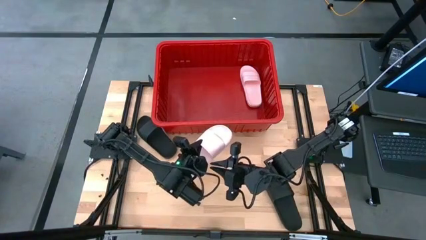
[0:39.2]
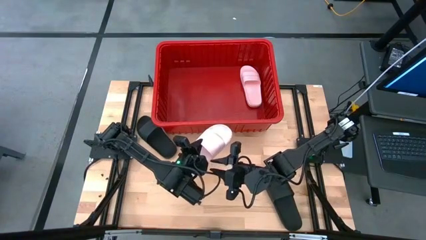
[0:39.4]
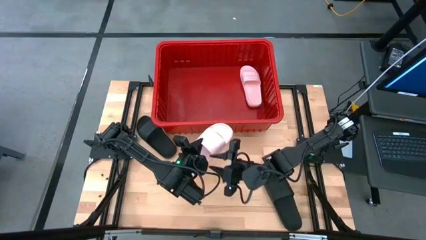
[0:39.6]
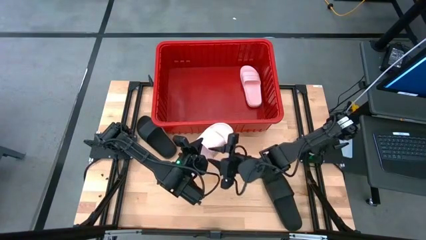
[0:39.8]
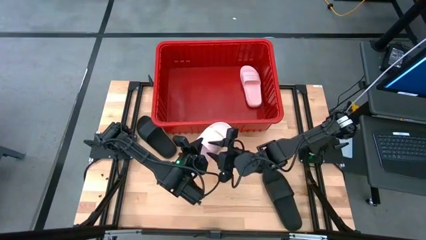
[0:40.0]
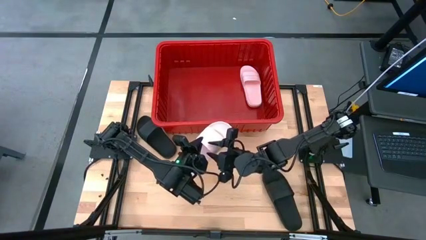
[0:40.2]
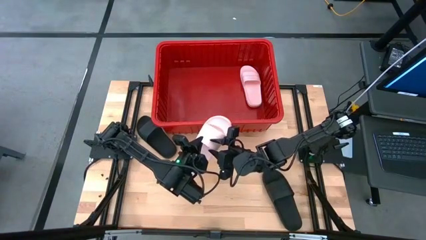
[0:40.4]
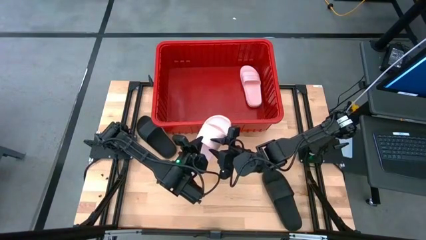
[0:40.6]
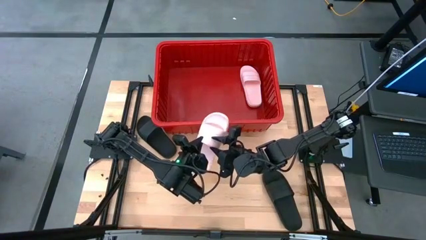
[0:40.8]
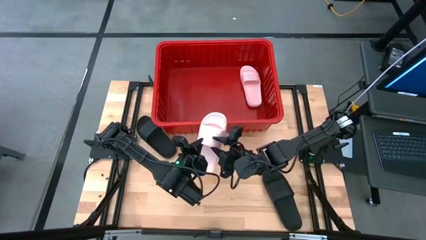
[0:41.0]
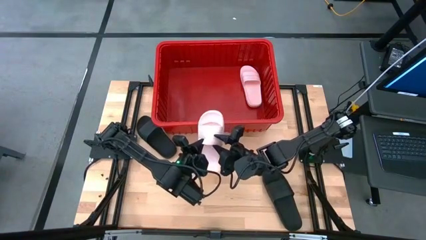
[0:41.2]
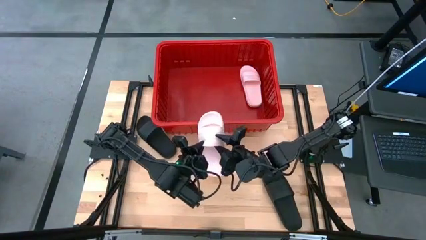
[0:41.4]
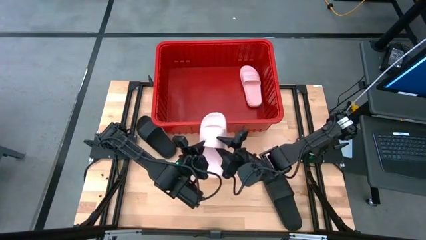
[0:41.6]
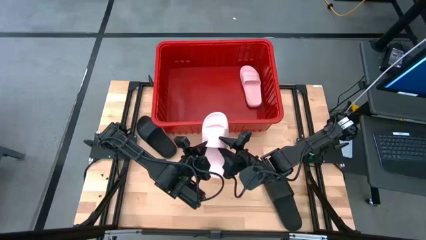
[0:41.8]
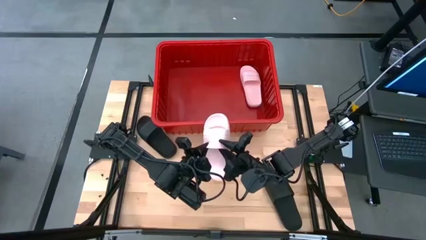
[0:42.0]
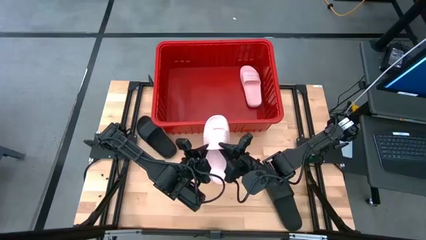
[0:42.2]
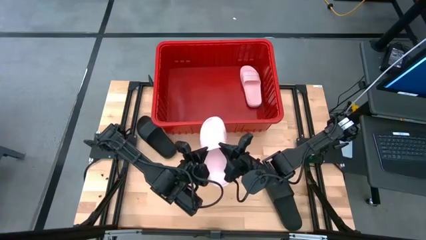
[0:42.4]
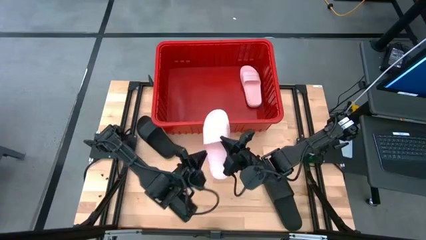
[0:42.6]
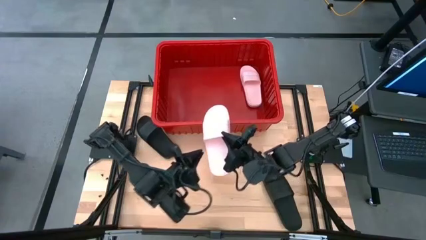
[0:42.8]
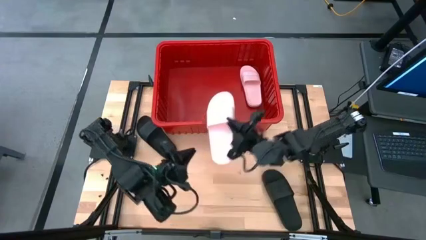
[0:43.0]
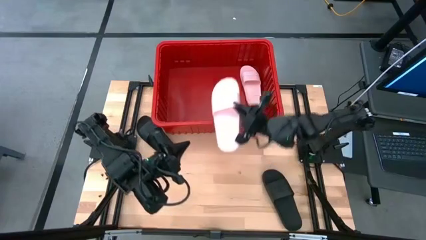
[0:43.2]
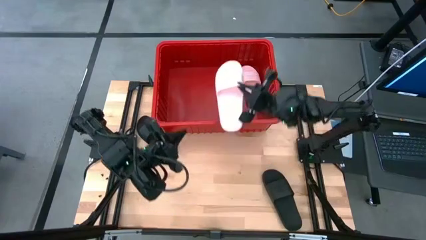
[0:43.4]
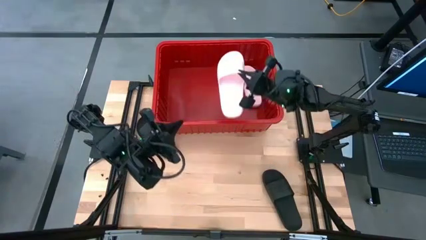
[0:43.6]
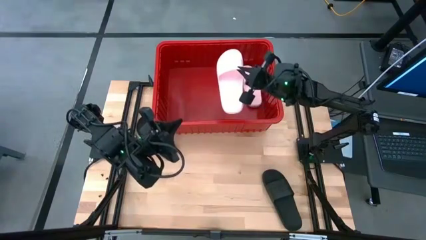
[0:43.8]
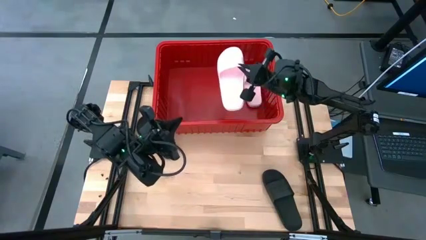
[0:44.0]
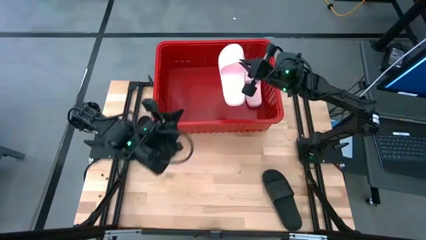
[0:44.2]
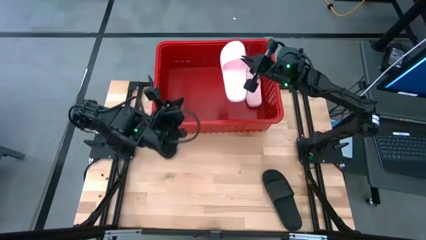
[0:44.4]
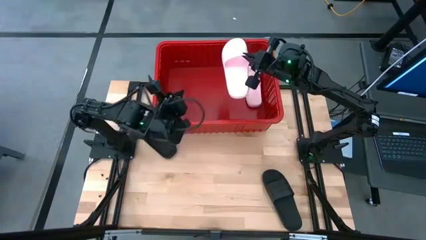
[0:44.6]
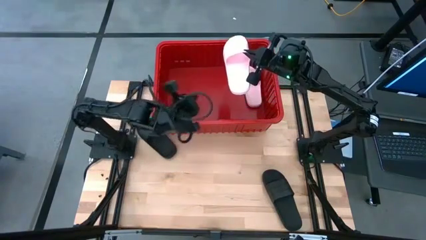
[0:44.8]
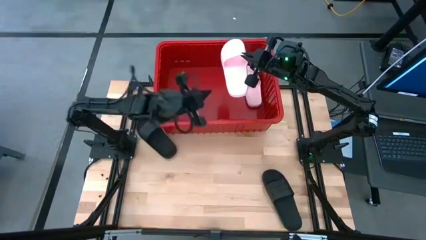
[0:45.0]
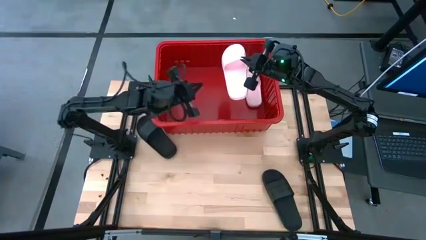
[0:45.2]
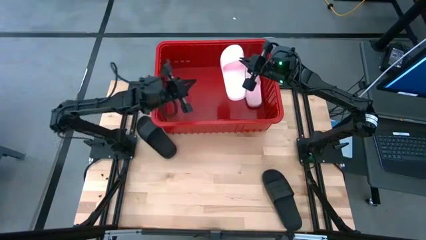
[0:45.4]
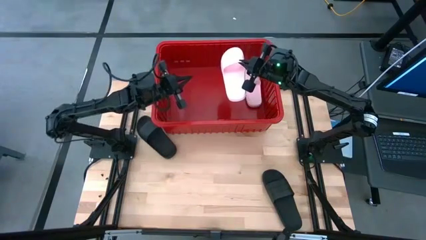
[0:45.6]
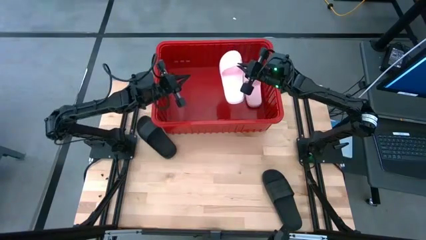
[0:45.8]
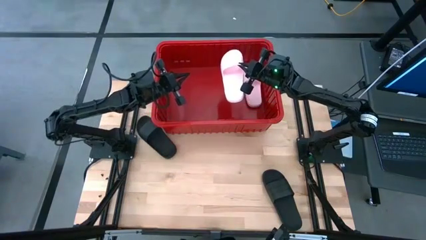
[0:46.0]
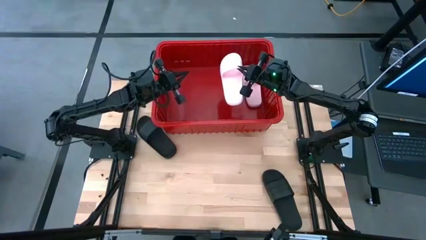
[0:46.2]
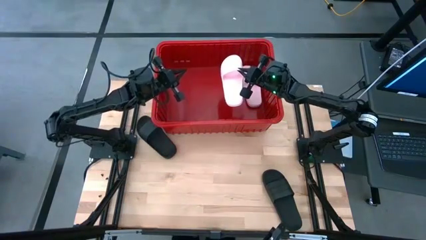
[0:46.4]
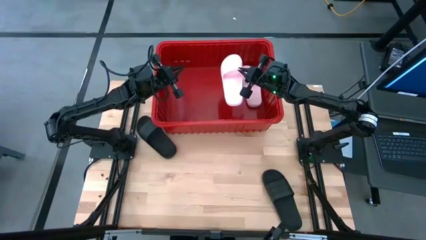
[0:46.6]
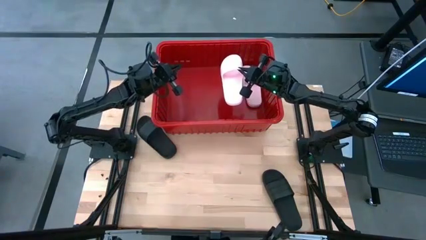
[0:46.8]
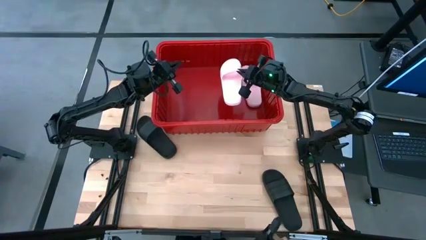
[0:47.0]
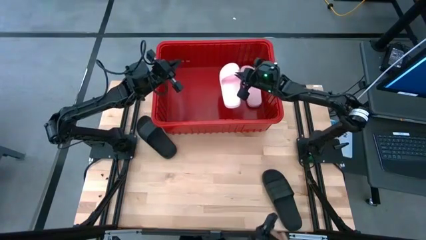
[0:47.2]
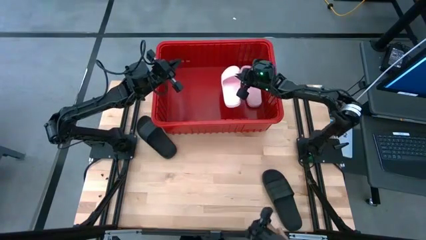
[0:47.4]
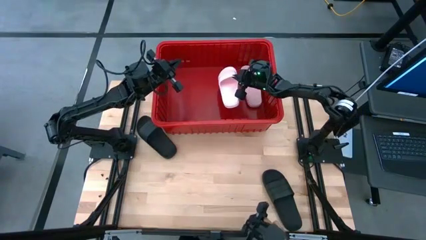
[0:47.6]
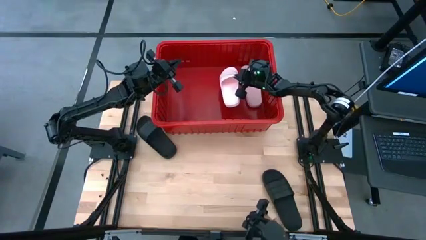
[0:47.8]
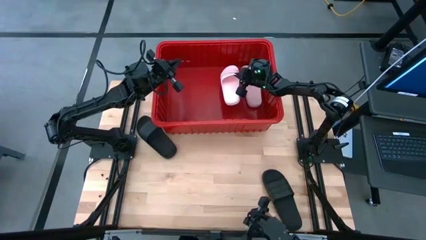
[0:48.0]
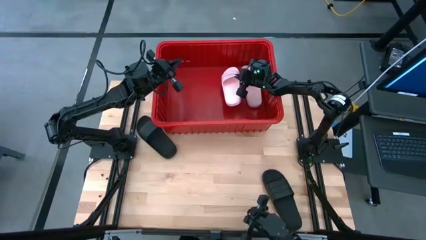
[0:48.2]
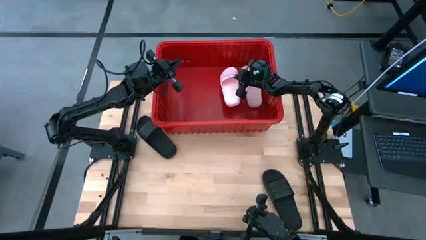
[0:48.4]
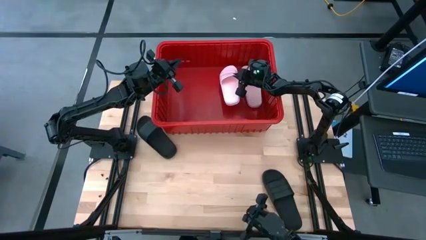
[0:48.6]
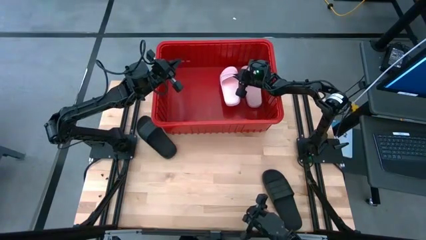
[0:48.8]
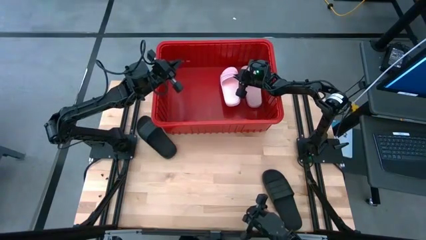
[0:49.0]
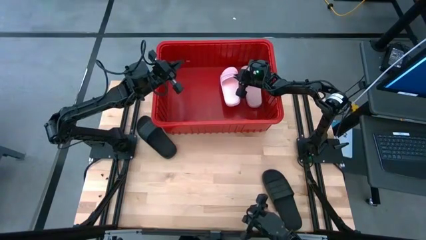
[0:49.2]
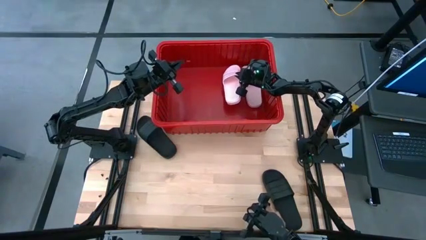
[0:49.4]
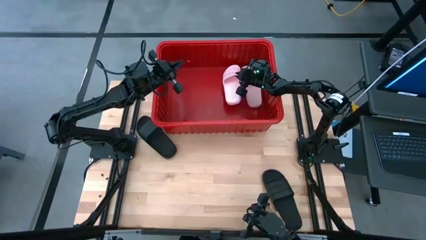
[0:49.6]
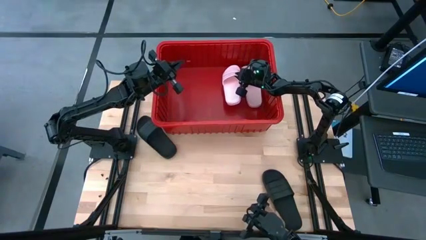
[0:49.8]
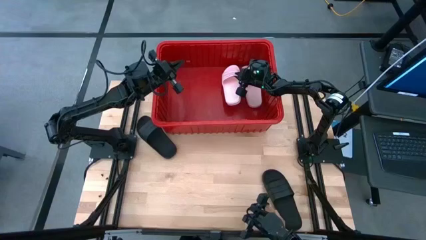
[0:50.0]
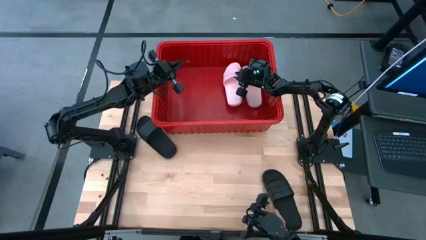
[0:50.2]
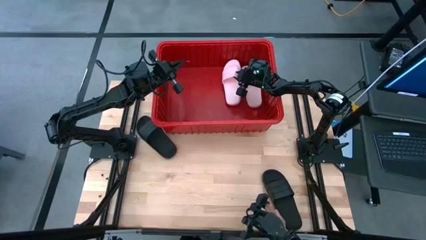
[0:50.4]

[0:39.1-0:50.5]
Task: Pick and place slides into bin
Put the pink slide into the red bin

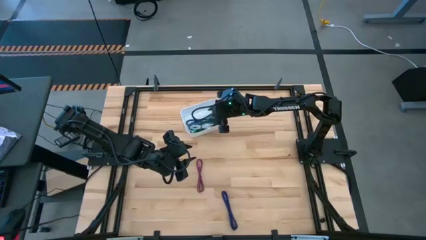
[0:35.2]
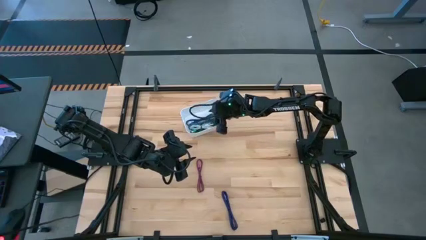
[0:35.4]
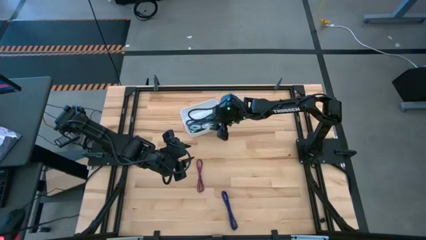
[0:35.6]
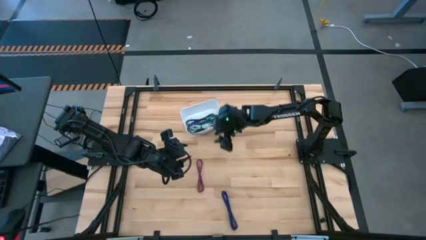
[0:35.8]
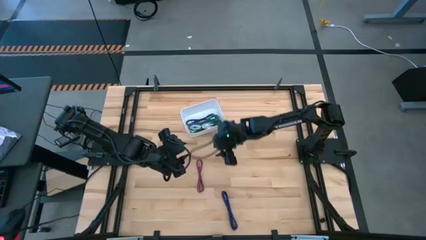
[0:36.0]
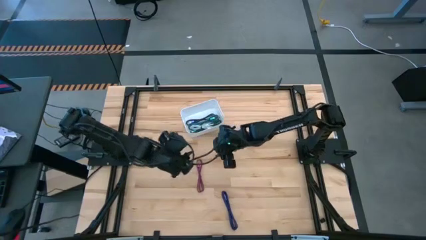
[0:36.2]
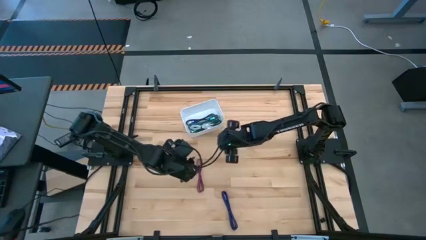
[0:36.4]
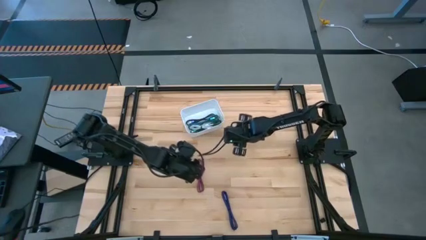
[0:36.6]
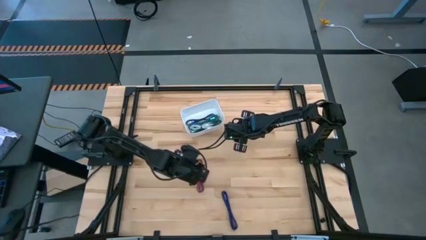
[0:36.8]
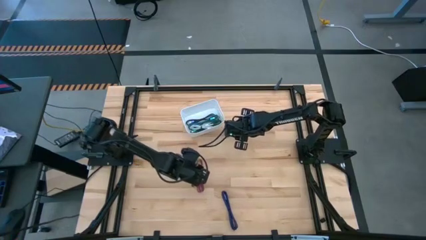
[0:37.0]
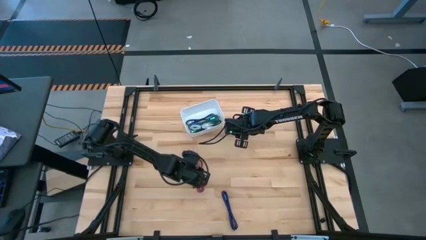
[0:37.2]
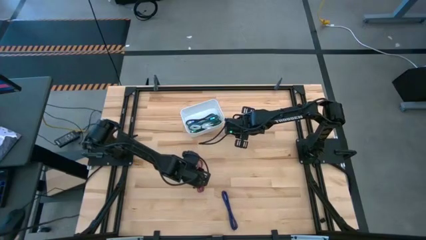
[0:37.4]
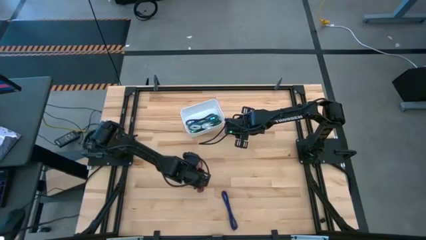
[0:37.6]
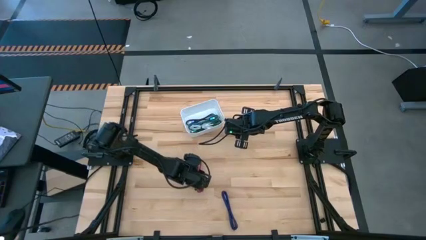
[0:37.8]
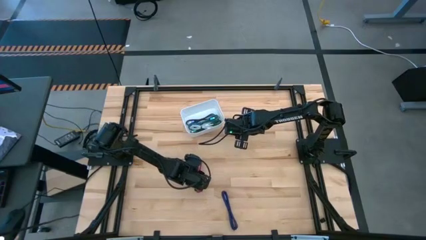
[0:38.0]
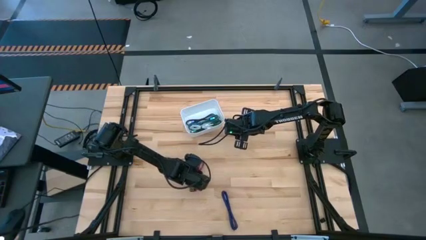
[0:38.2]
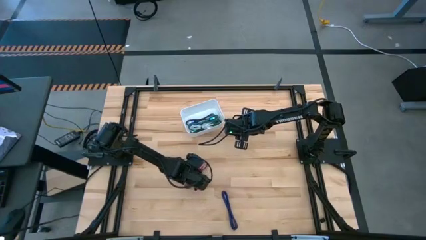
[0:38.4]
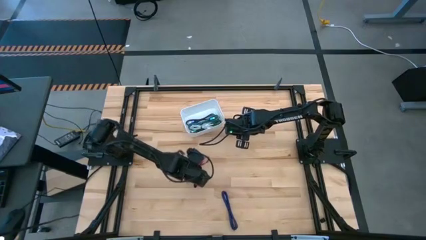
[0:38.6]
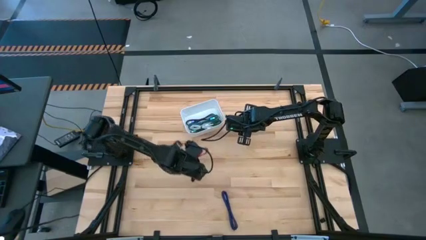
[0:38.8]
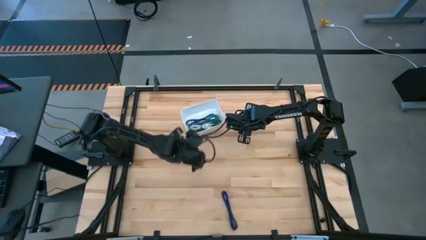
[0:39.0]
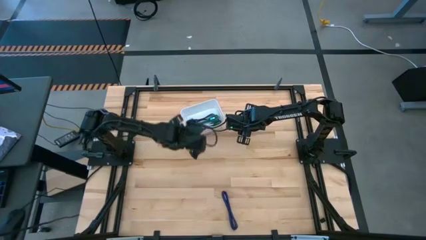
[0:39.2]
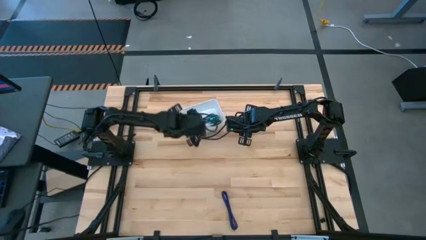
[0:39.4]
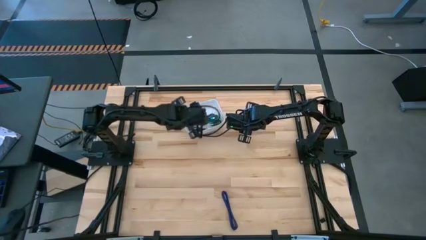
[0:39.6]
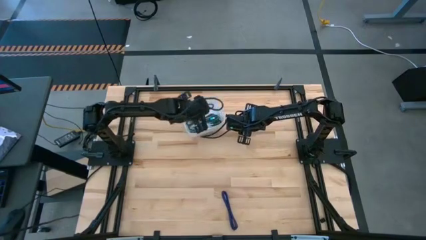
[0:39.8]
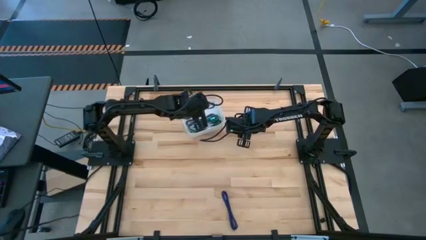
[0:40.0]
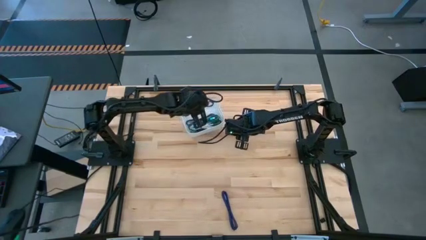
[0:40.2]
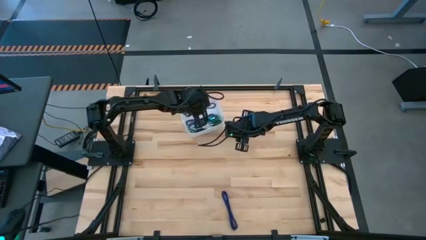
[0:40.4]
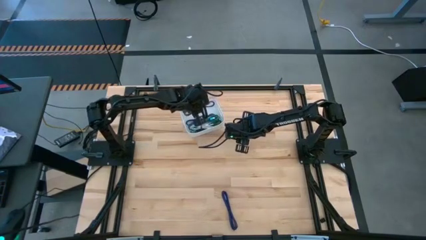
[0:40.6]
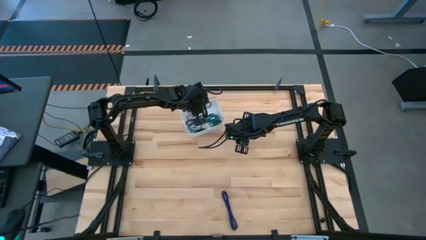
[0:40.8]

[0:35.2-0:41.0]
Task: Pick and place USB-C Cables
Put the pink charger cable into the white bin
